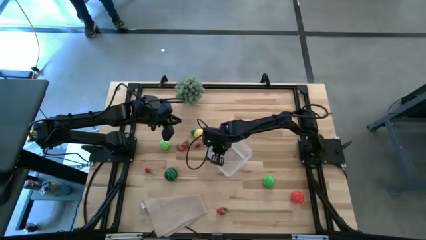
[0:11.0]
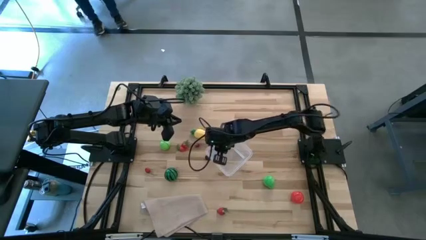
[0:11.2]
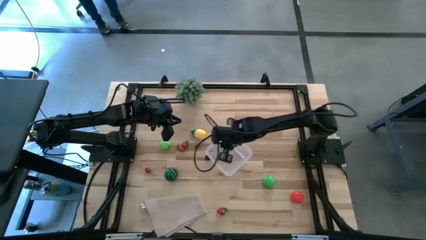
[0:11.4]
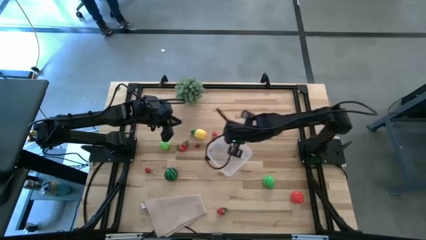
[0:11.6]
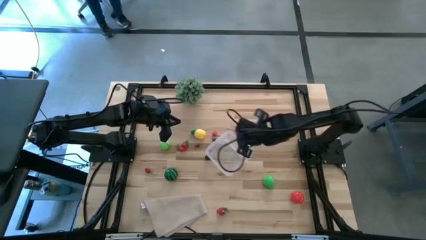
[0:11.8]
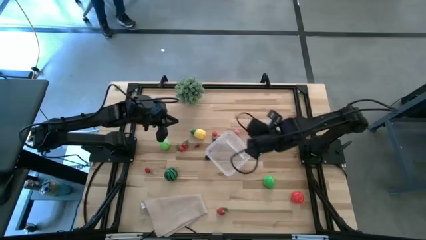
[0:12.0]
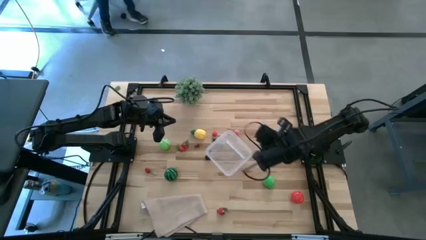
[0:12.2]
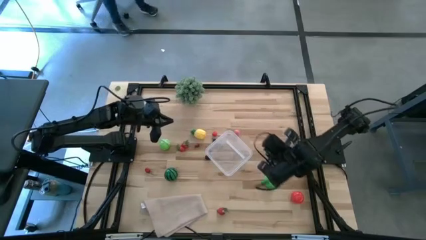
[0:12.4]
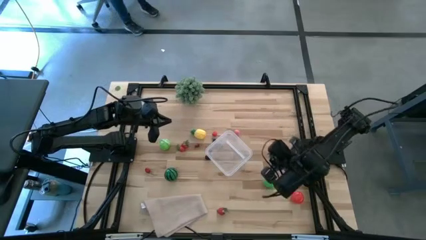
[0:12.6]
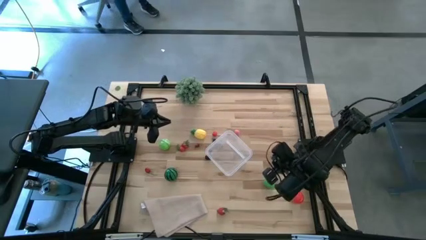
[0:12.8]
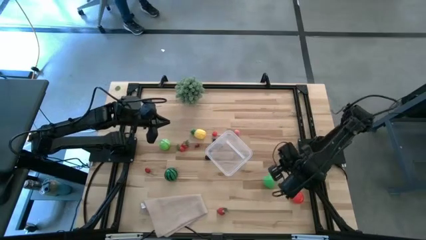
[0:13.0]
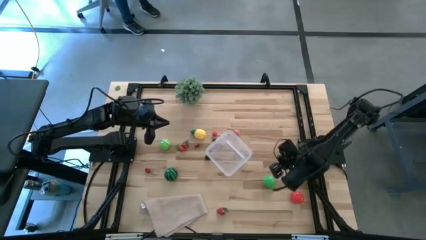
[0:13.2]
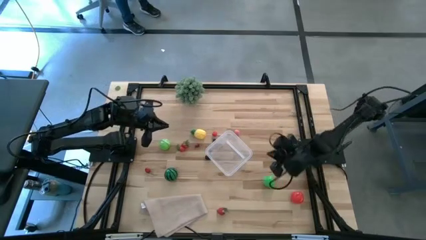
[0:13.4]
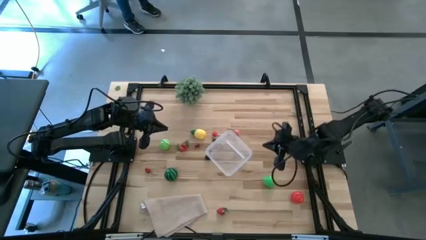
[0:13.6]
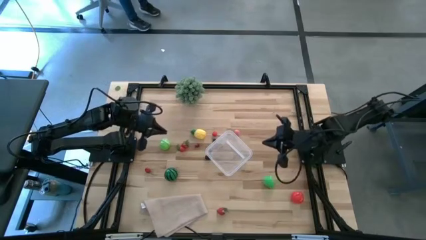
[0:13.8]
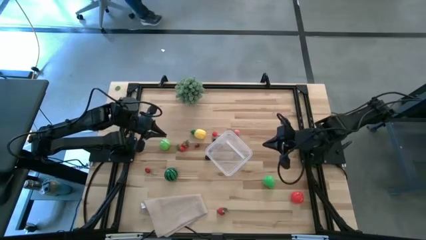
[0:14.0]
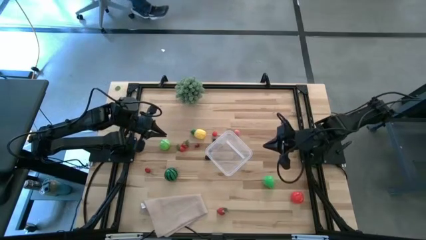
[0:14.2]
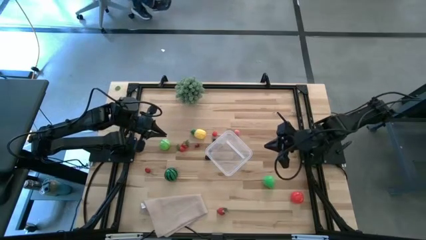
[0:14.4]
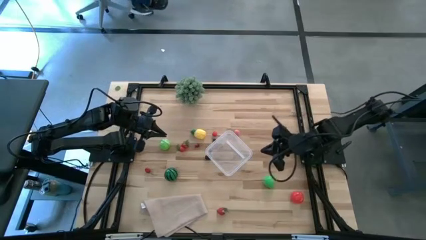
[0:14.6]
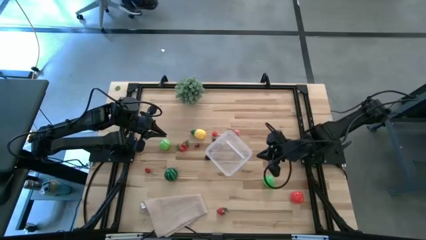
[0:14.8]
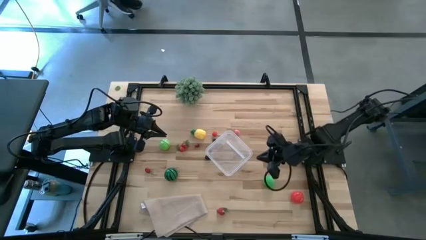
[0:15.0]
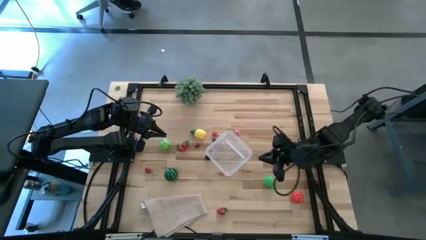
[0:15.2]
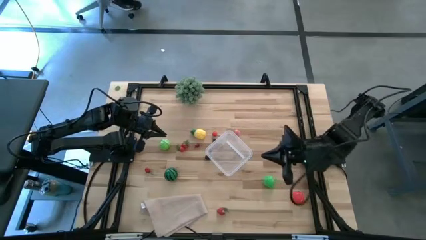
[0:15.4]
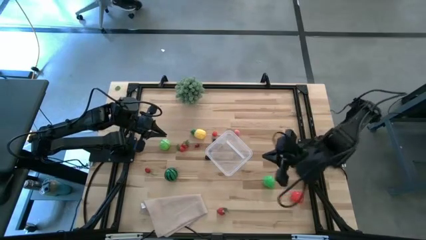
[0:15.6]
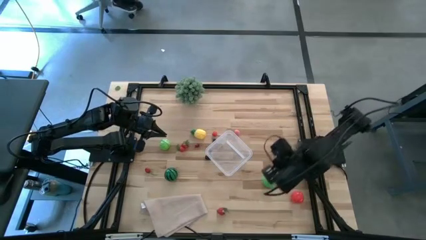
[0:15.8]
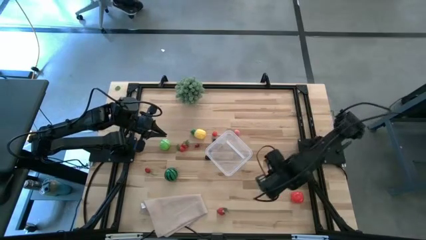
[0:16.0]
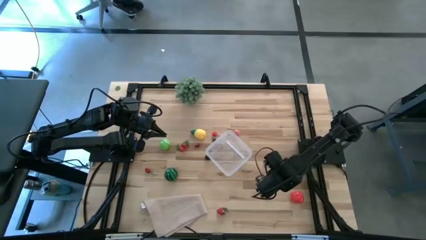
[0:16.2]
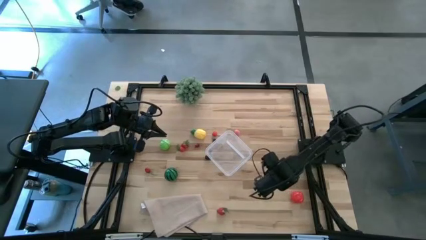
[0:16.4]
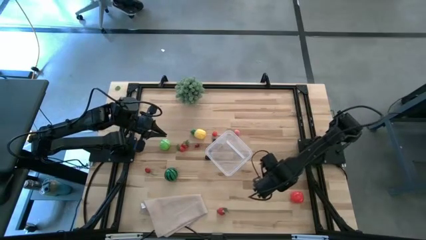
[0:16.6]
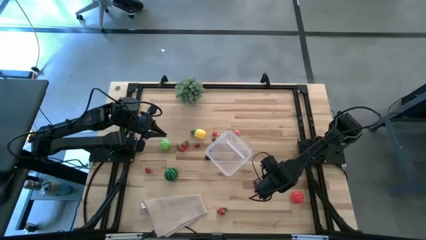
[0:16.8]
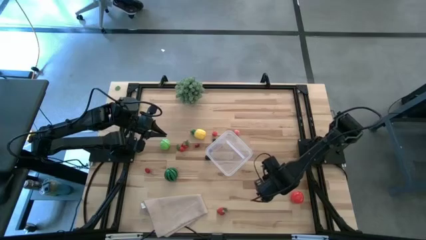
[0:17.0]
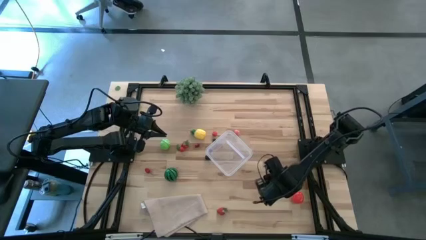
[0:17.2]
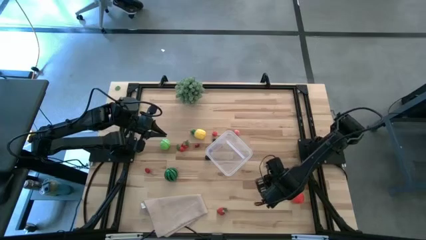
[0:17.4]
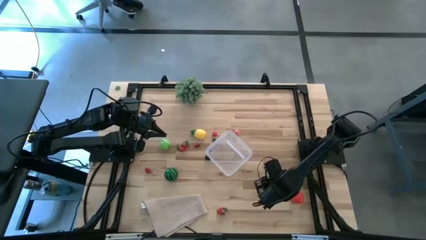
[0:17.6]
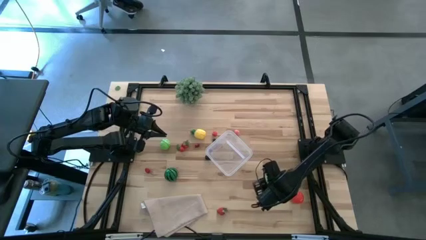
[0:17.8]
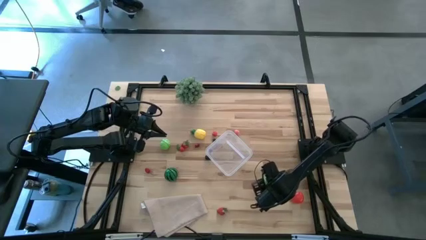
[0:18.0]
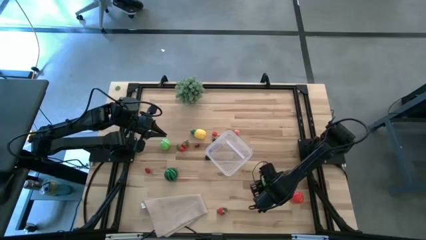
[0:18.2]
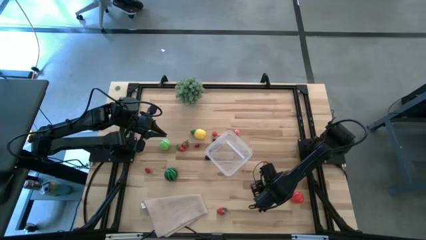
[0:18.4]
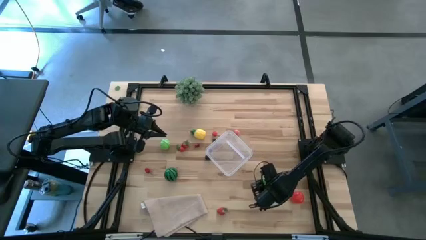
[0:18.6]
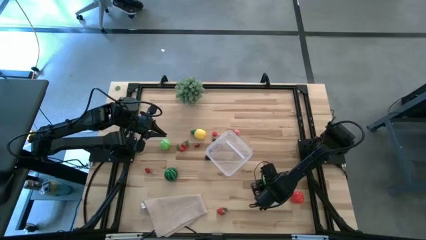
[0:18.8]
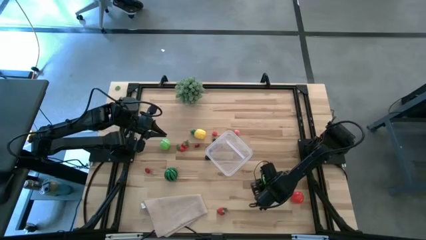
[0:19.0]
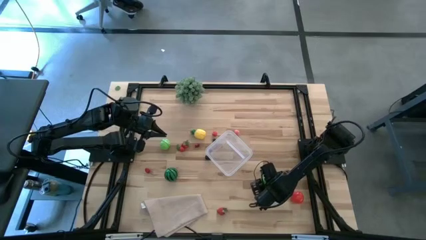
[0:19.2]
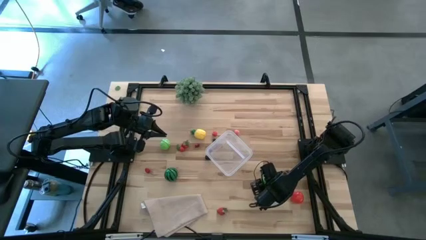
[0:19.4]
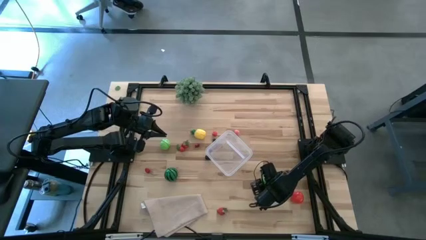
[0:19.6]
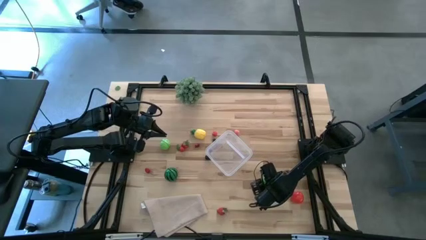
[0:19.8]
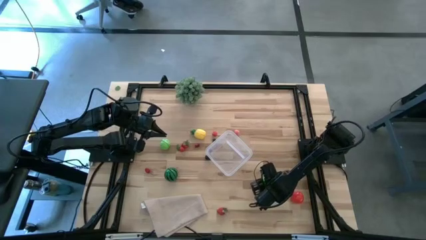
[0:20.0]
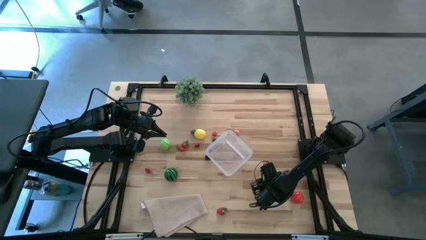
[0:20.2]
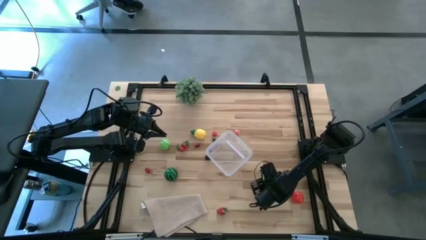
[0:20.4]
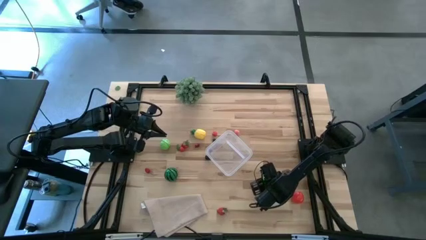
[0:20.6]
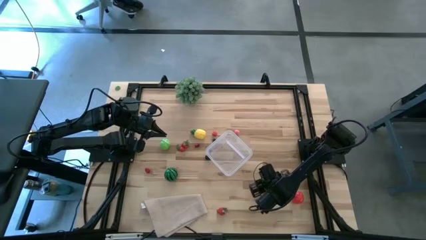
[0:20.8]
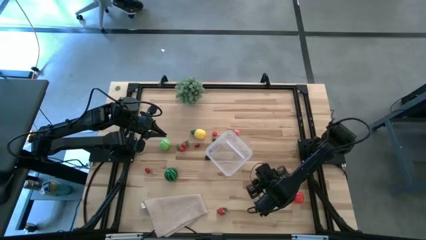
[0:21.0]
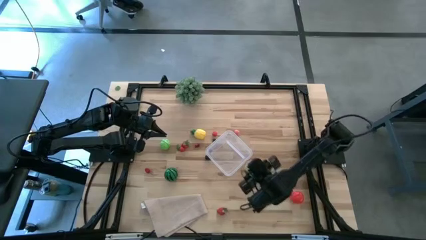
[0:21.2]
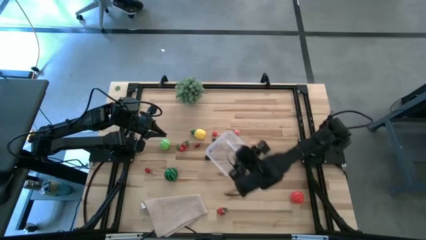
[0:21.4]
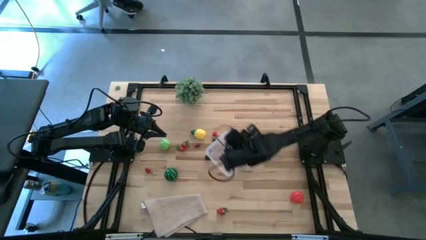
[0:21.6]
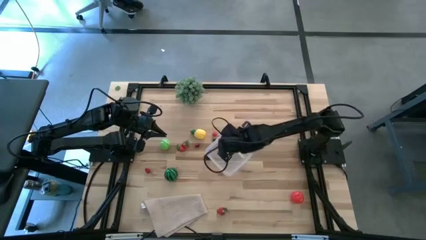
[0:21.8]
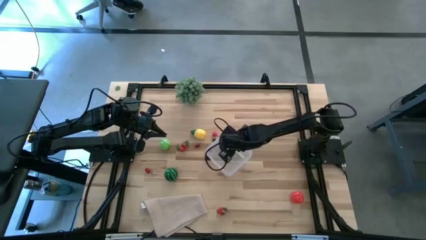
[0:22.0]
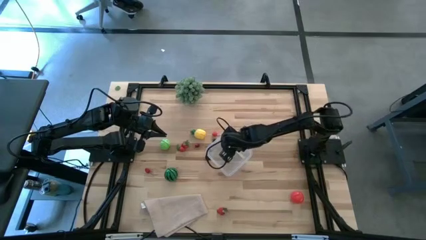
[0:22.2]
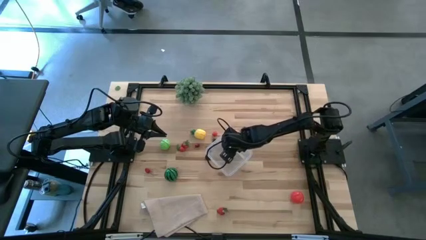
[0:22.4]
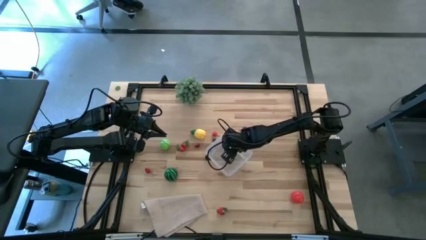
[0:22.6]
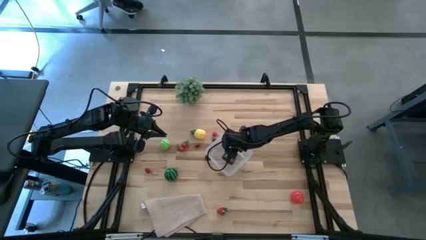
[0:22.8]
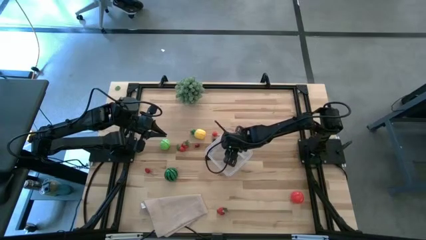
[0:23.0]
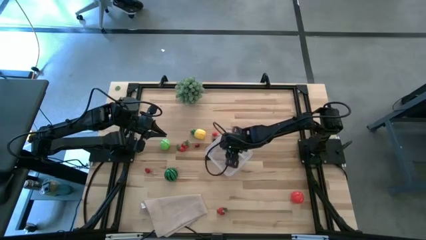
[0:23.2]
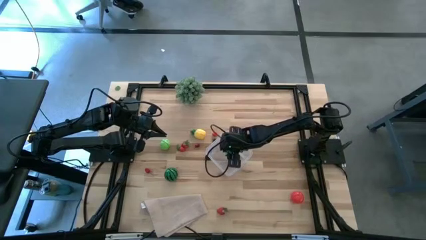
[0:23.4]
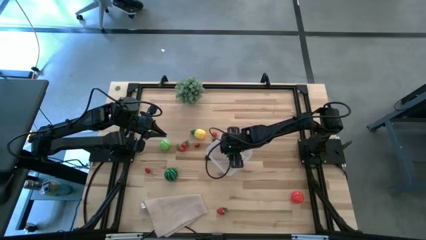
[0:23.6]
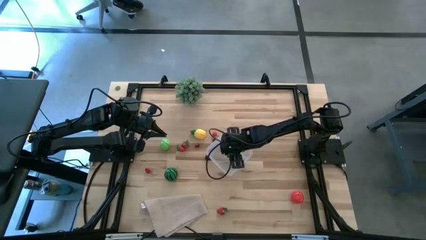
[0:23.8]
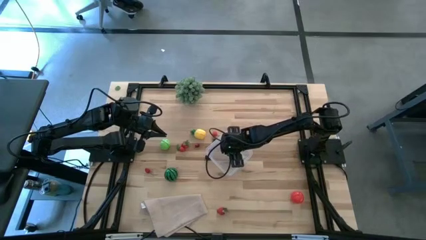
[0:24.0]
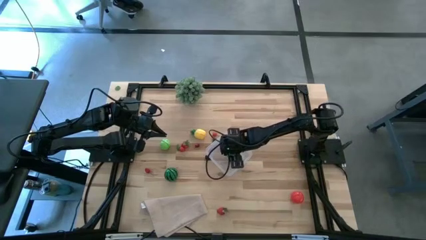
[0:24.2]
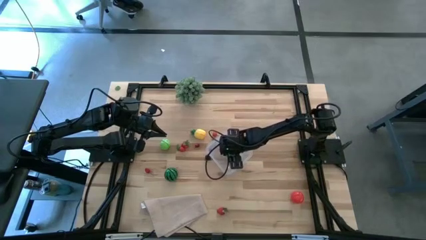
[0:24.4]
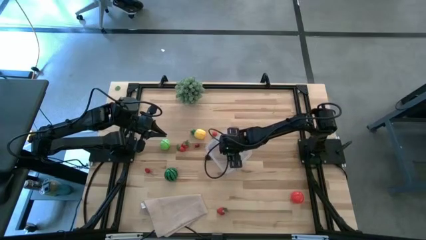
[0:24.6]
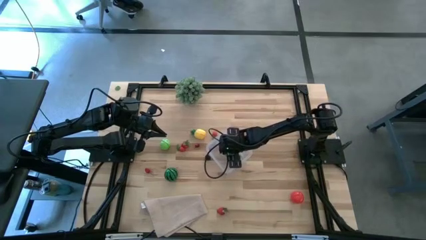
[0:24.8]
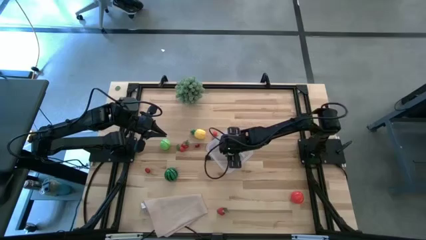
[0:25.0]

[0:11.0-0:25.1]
Task: Pick and placing Produce into tupperware
Put the chayote into the transparent bin

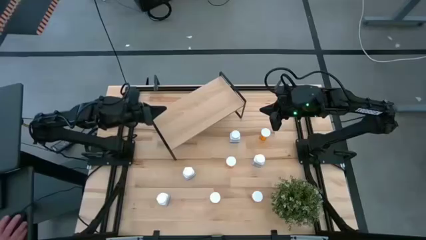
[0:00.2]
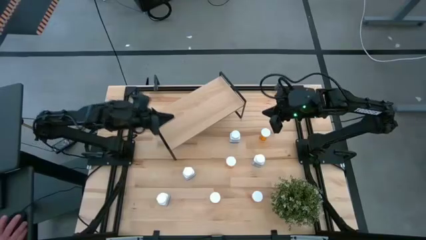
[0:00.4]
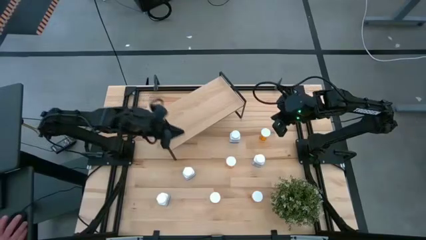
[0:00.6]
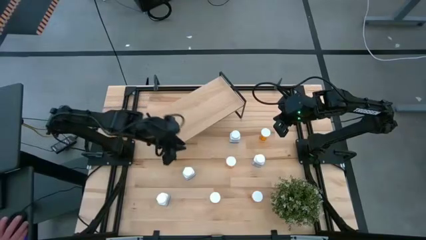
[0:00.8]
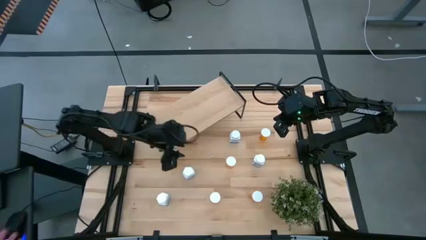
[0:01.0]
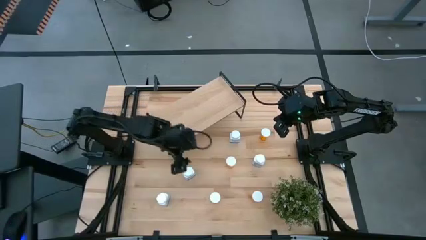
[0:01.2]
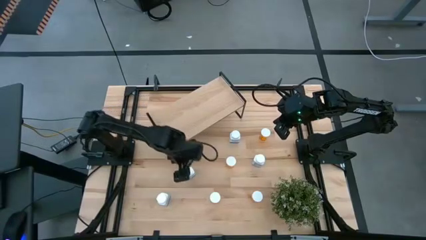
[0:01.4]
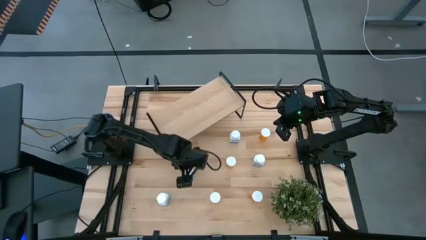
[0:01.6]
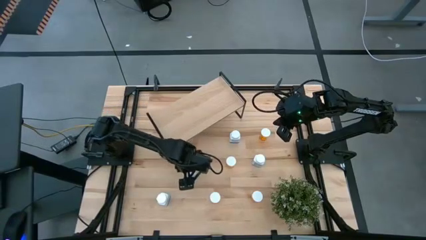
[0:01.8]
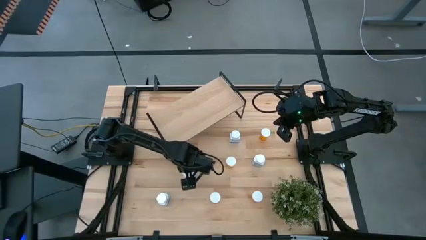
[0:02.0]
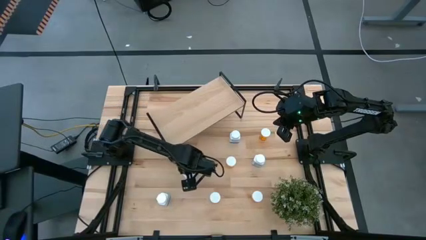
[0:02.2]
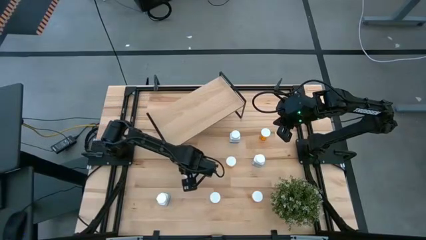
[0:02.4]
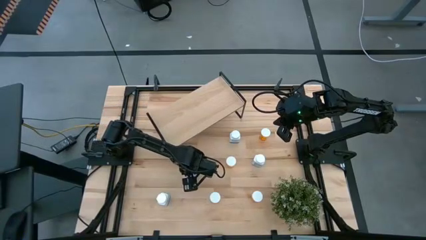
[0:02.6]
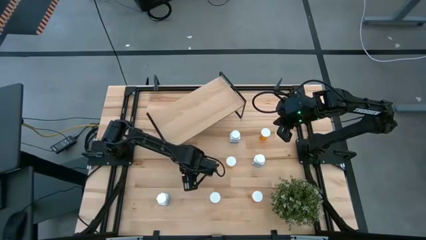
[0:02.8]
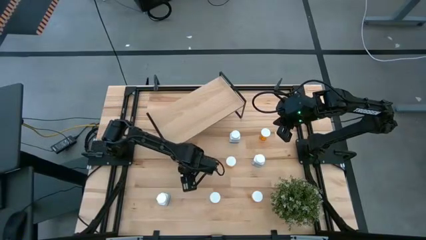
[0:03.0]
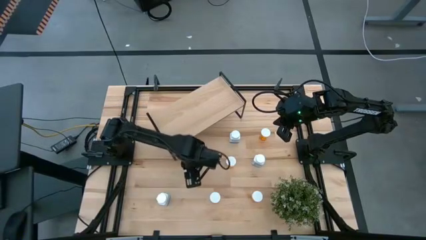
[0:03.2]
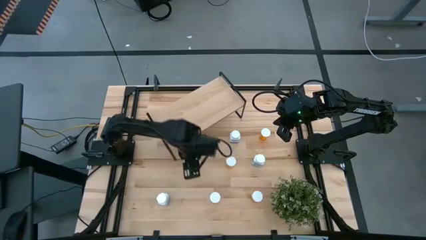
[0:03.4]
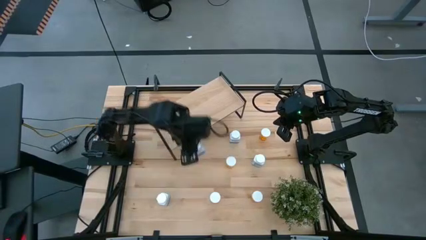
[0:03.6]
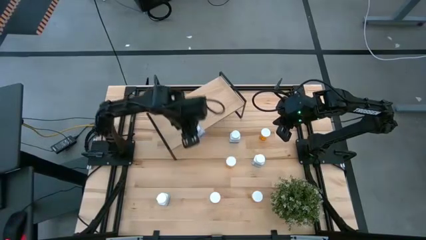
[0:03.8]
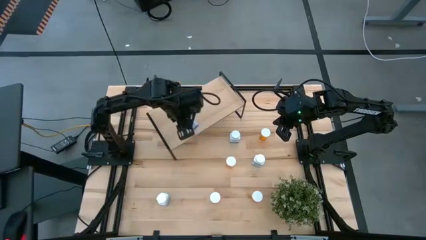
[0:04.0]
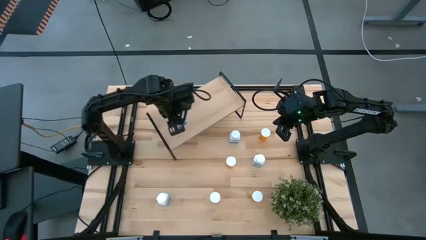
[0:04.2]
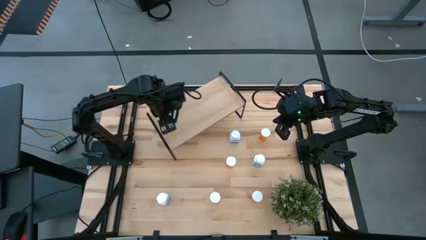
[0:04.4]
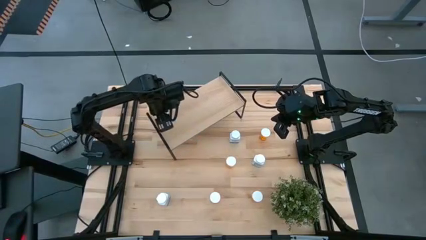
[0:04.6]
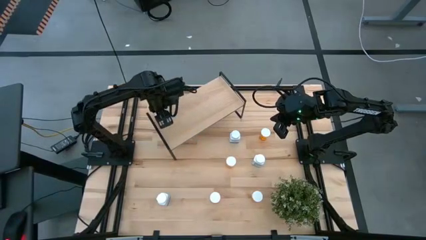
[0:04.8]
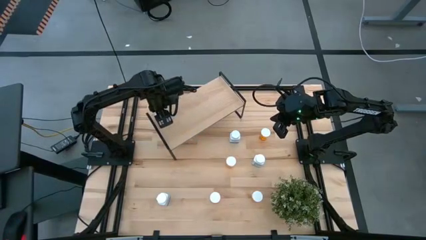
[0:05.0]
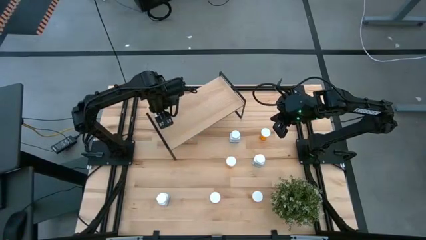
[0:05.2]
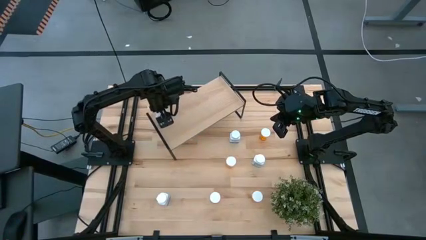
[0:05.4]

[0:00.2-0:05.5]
Task: Pick and place medicine bottles onto shelf by color
Put the white pill bottle on the shelf
